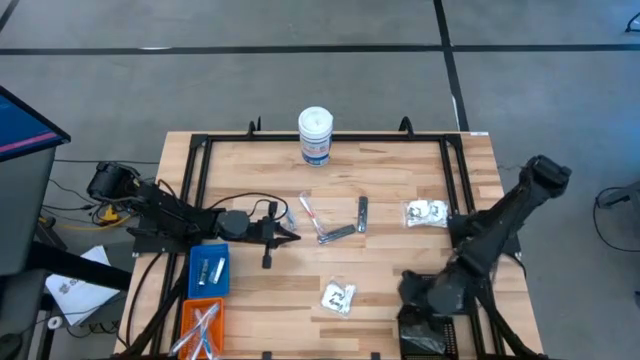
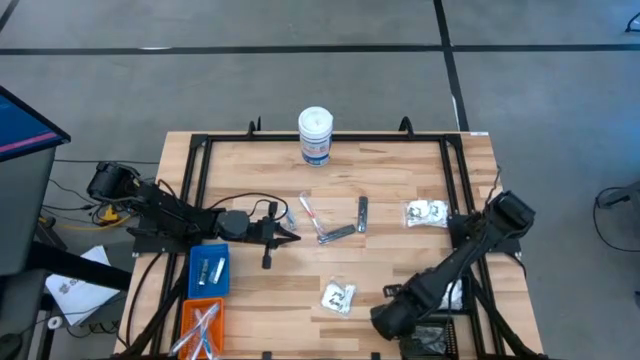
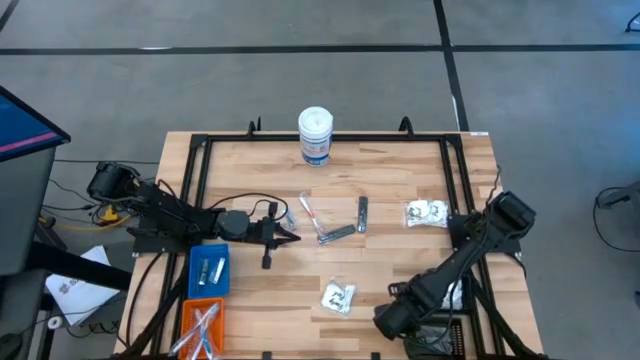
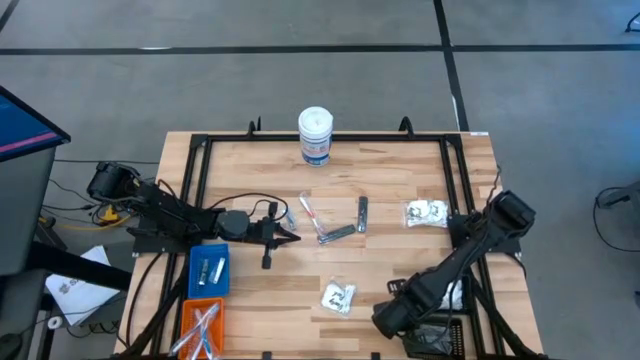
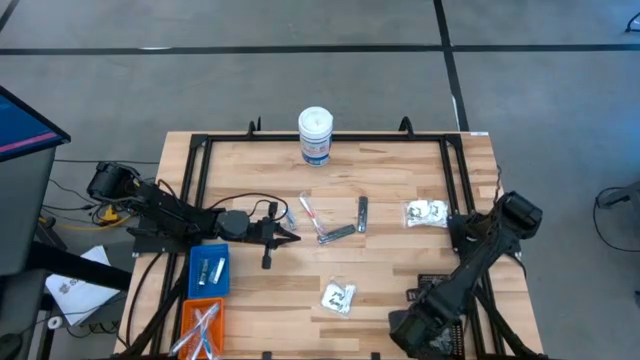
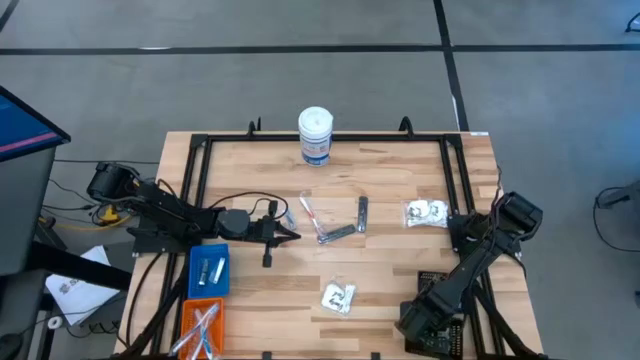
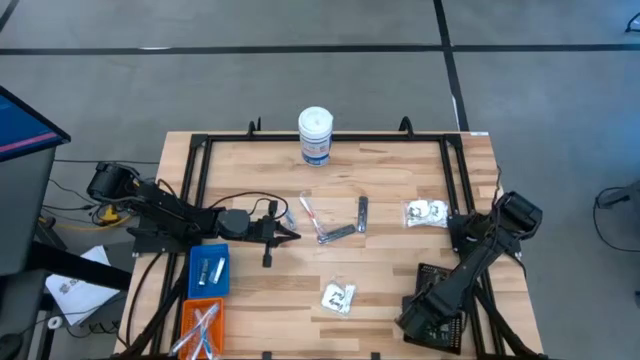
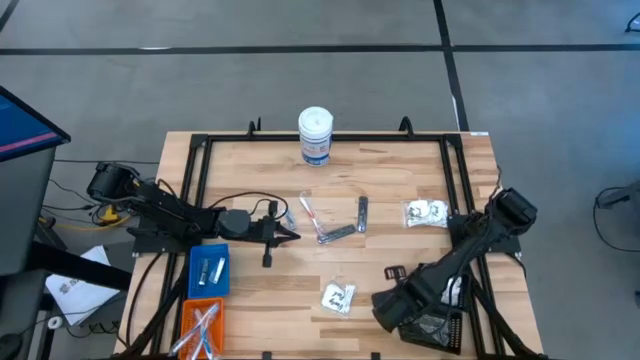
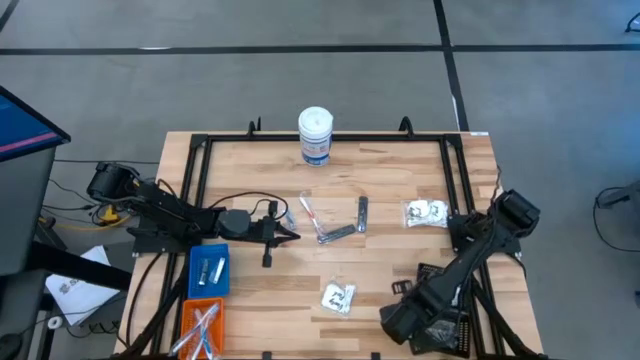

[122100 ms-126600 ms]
Task: Pick & Place Travel size toiletries
Adjust the bottom black bin

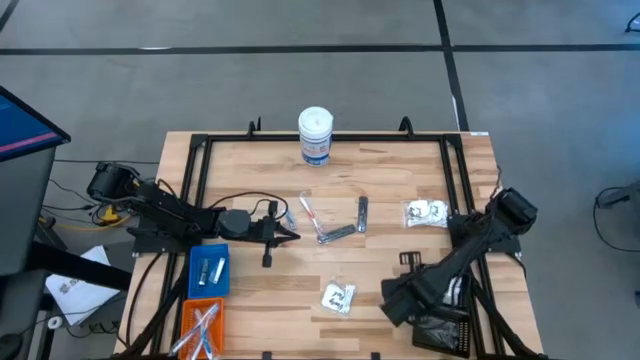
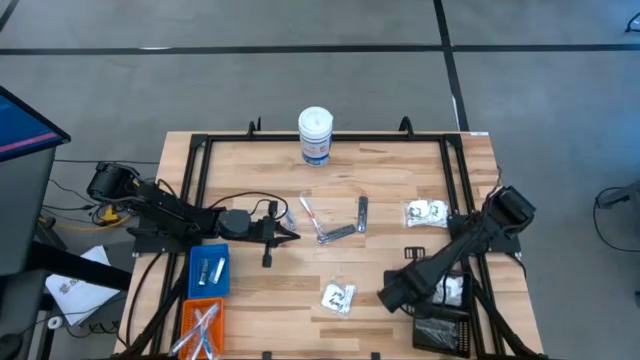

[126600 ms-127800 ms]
Adjust the top black bin

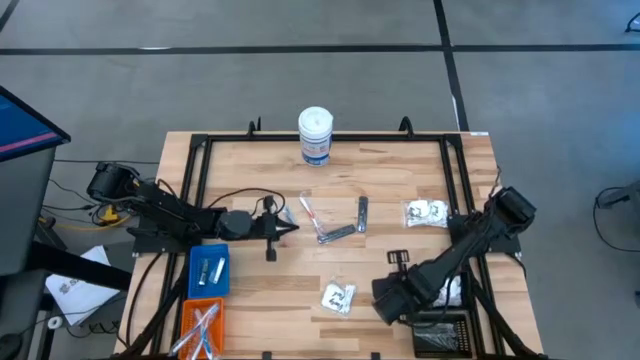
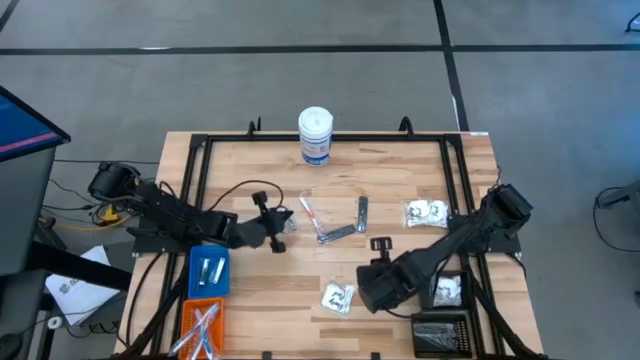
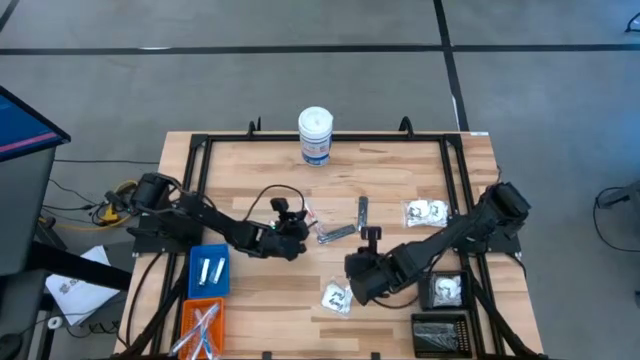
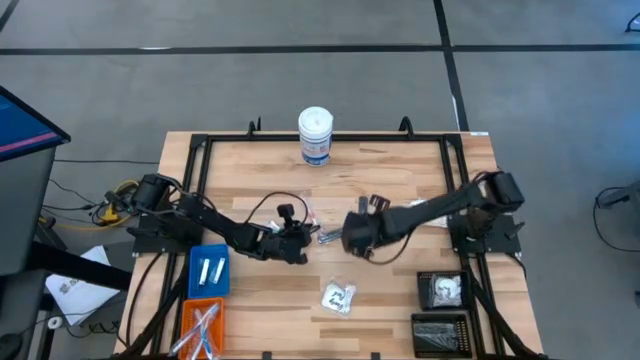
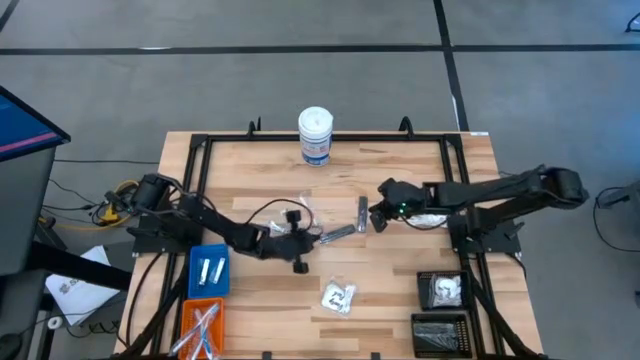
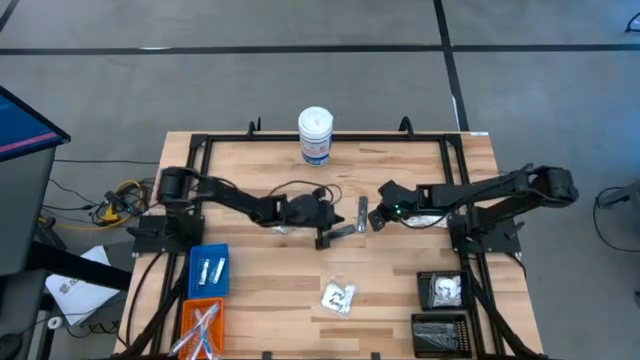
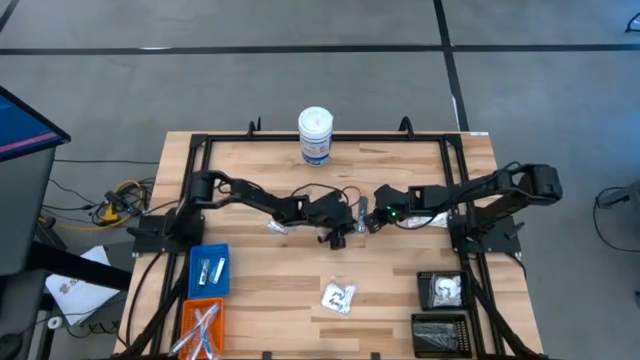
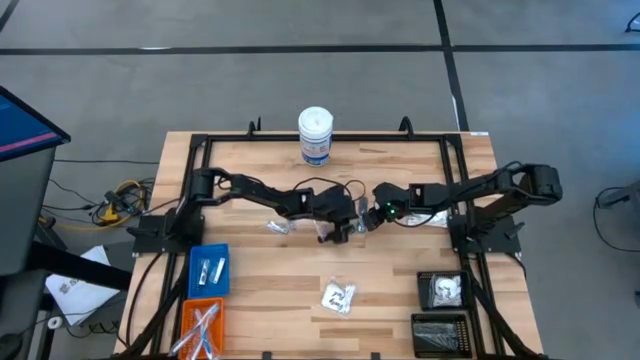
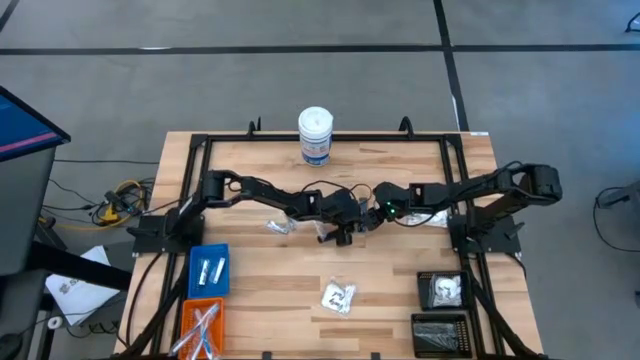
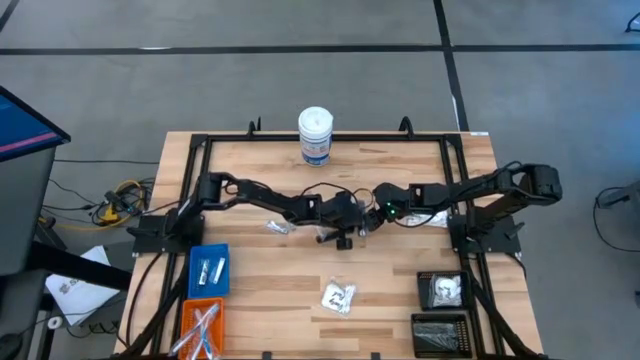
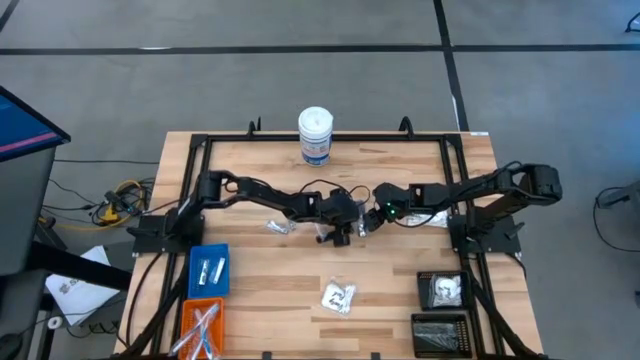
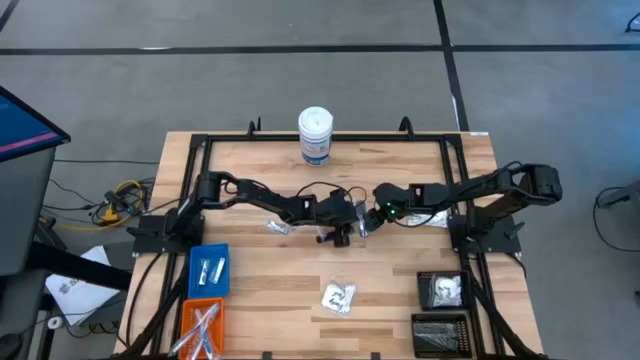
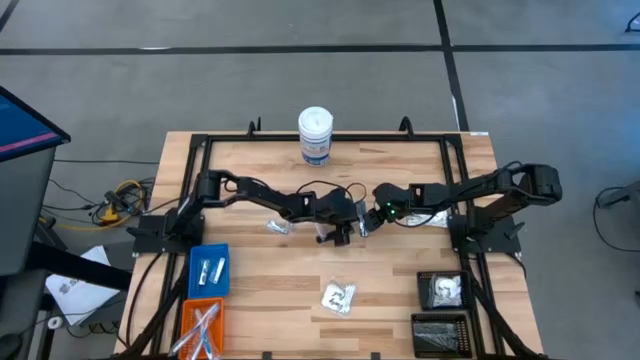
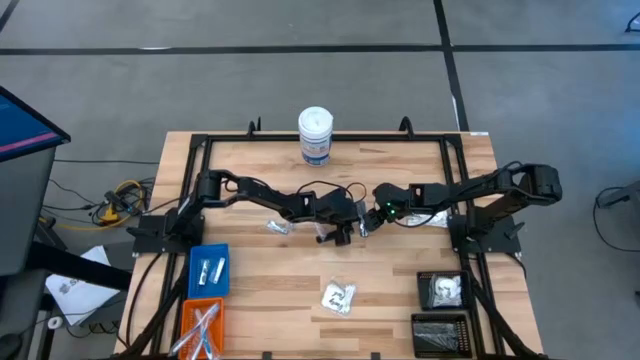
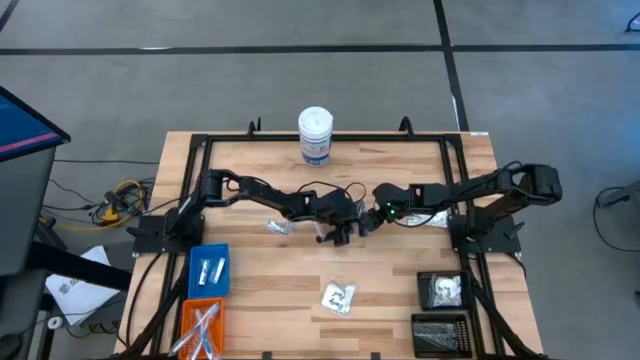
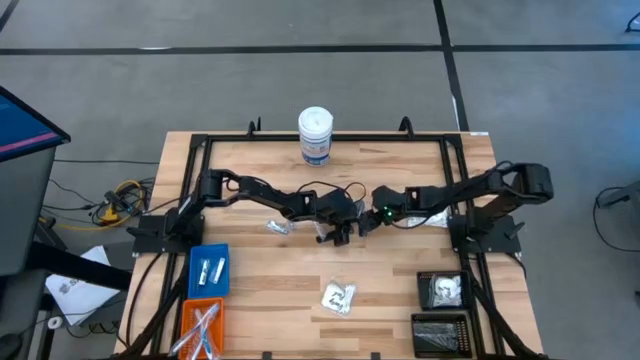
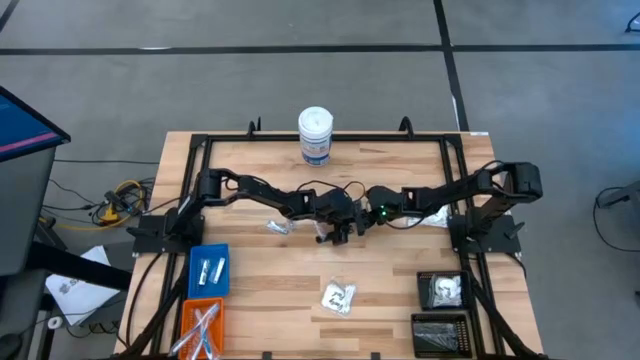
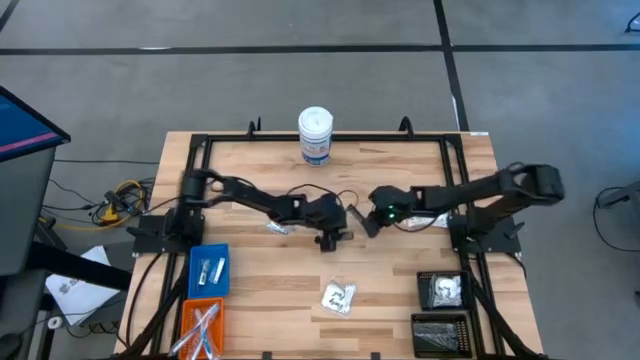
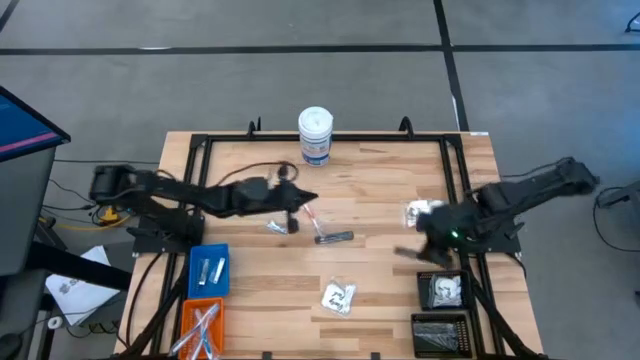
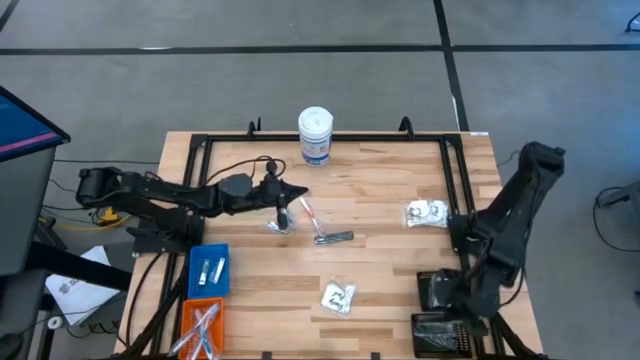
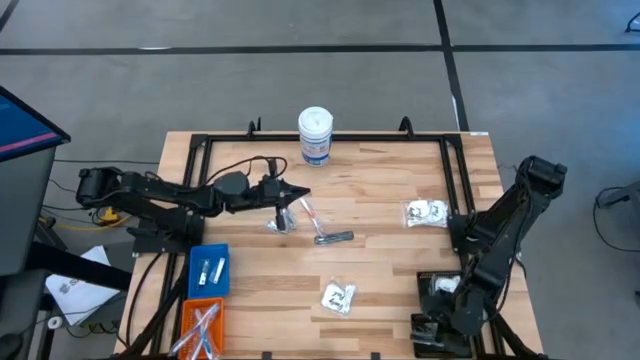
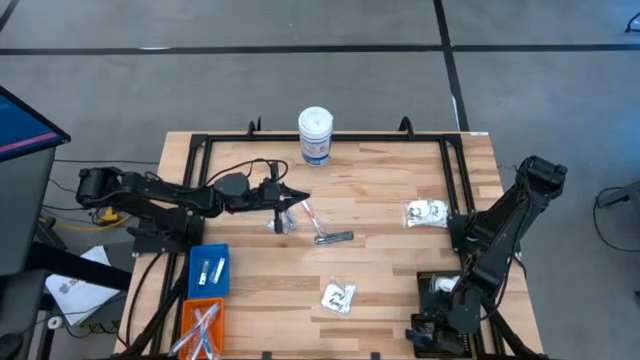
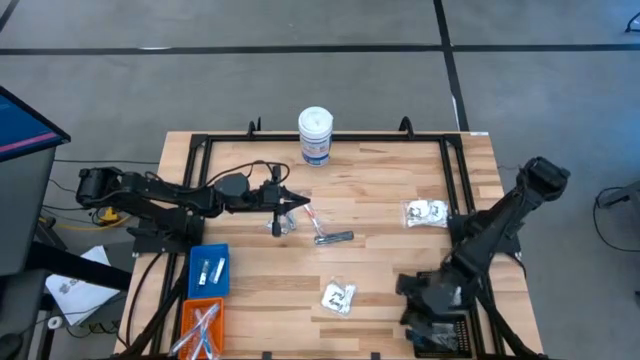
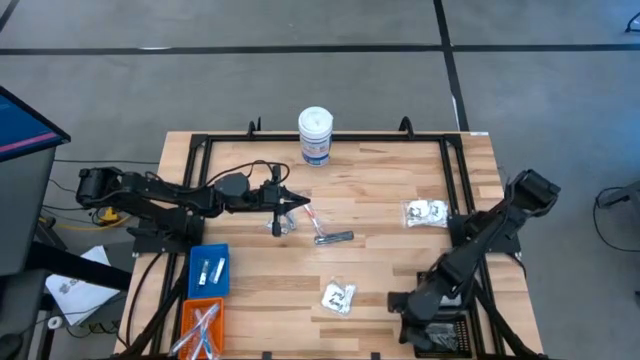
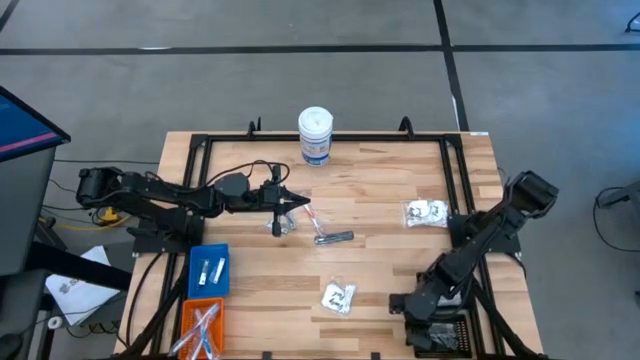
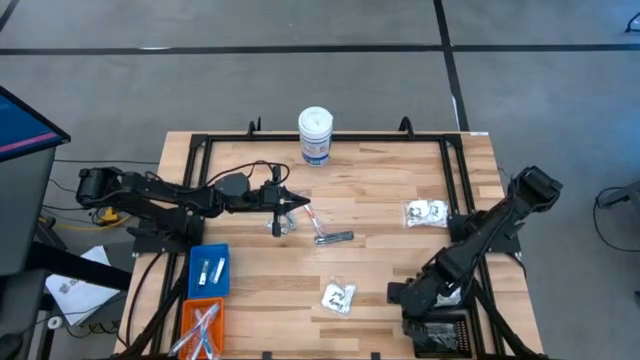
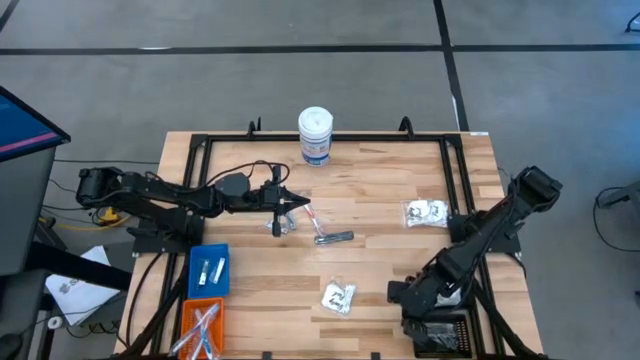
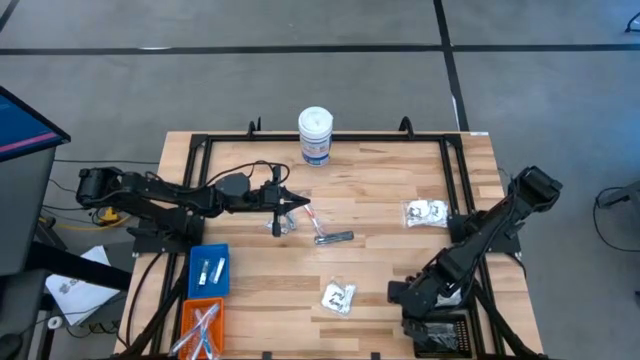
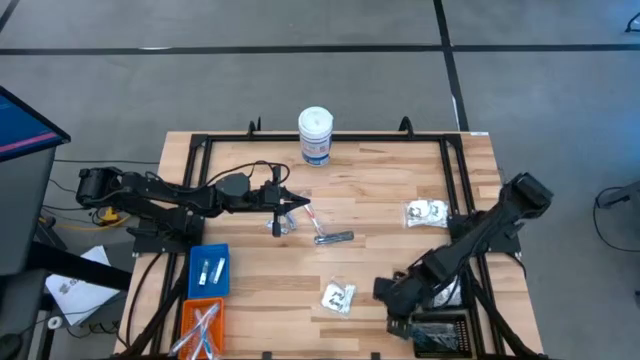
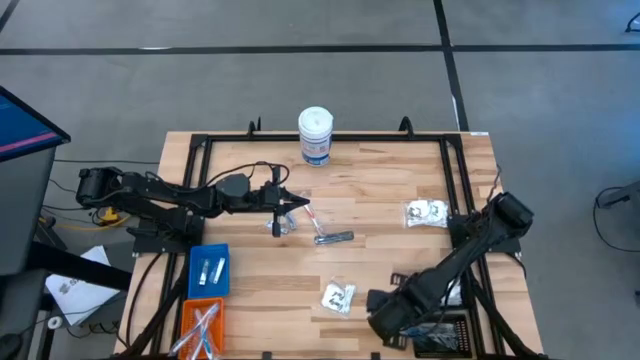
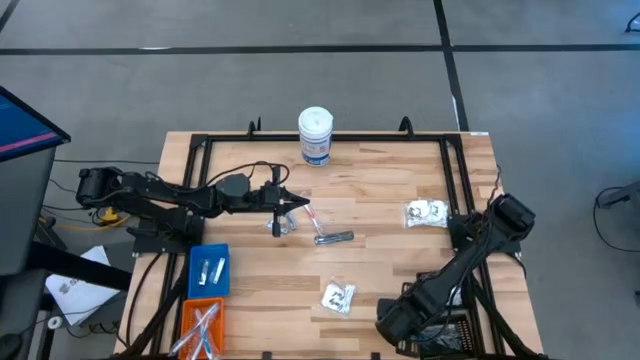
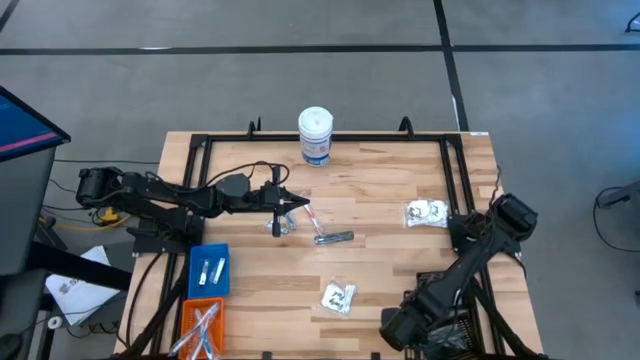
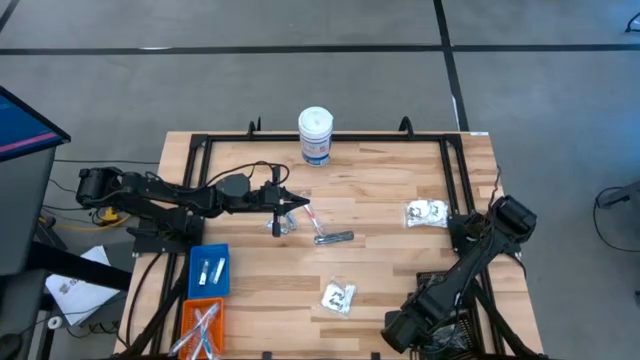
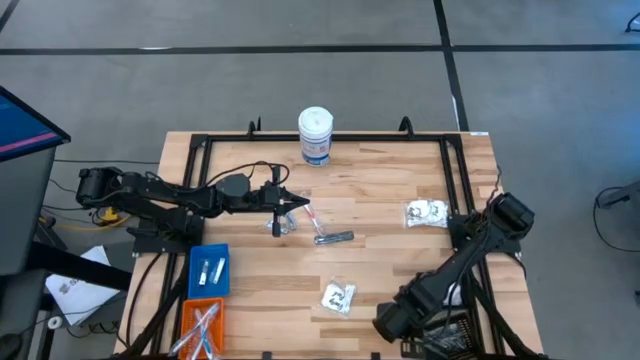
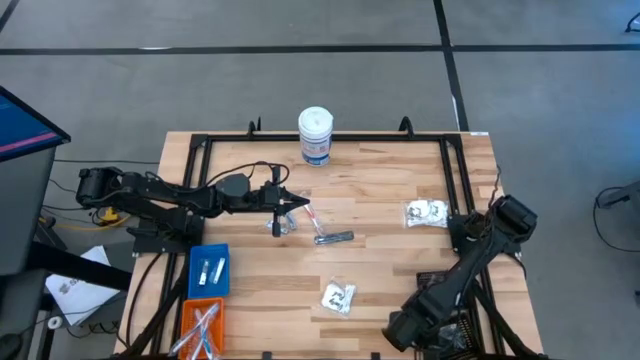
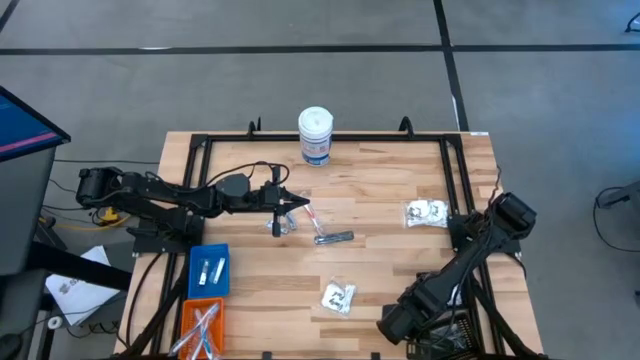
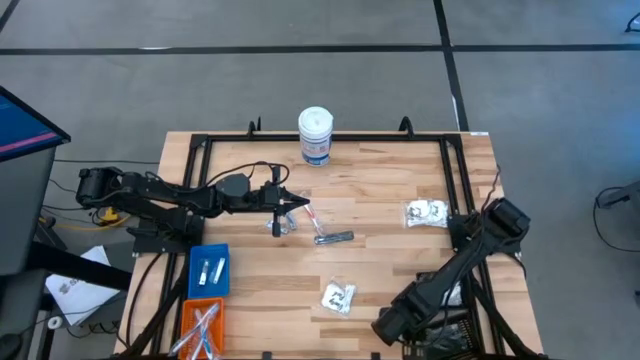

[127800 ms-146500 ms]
Put the black comb into the bottom black bin
